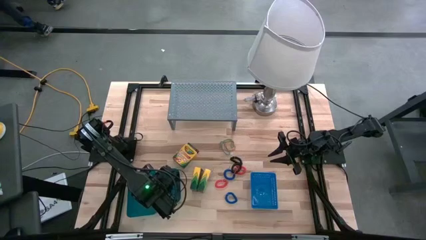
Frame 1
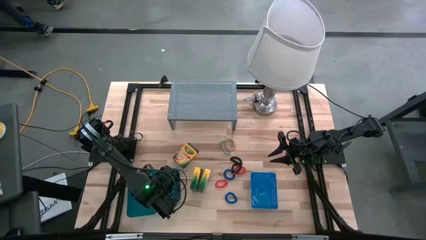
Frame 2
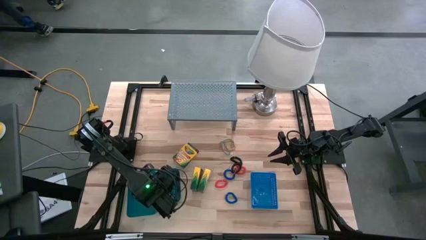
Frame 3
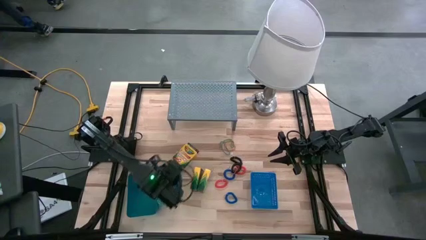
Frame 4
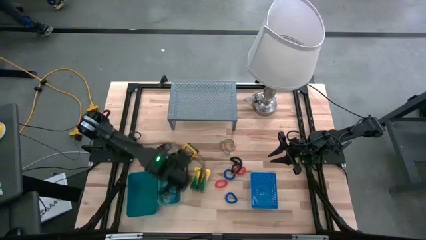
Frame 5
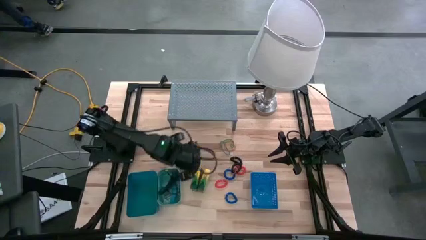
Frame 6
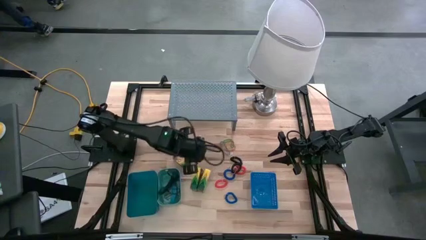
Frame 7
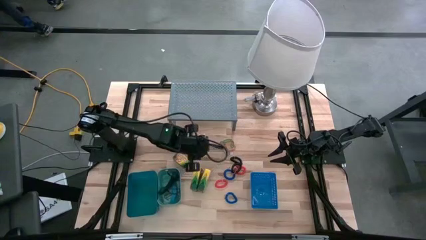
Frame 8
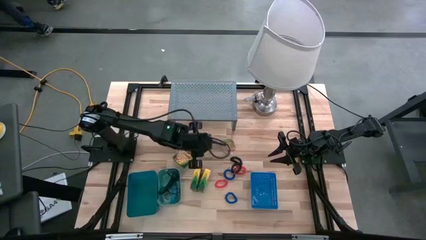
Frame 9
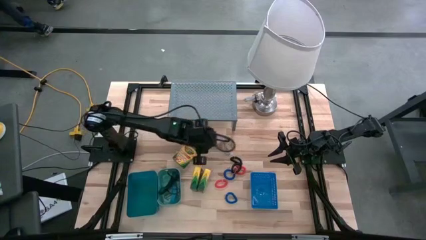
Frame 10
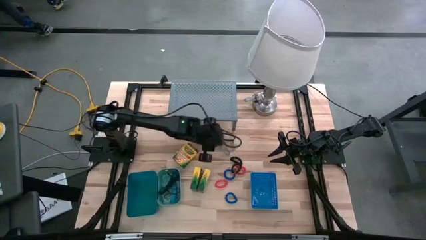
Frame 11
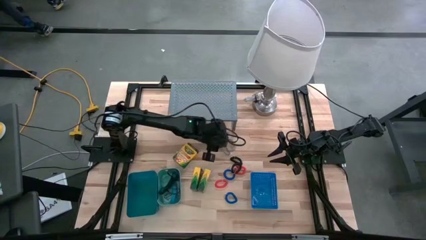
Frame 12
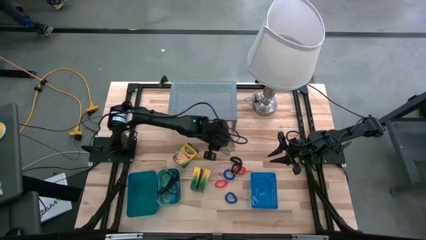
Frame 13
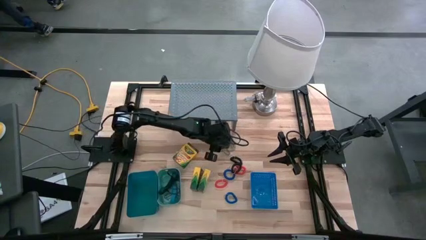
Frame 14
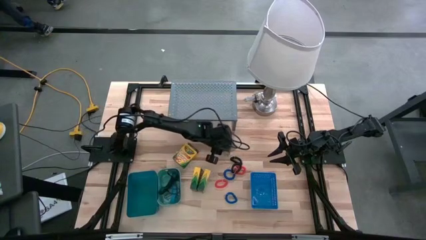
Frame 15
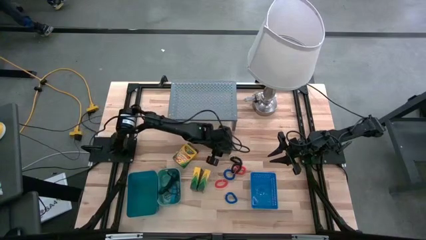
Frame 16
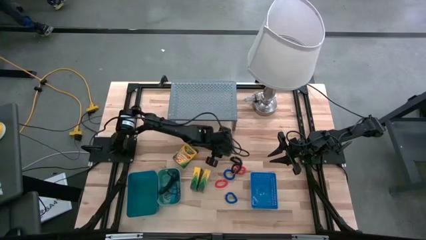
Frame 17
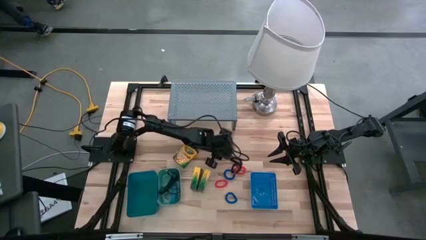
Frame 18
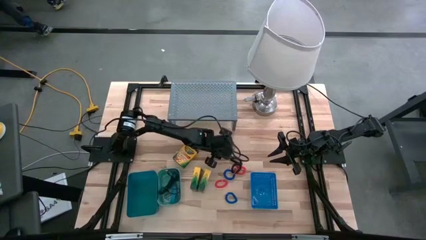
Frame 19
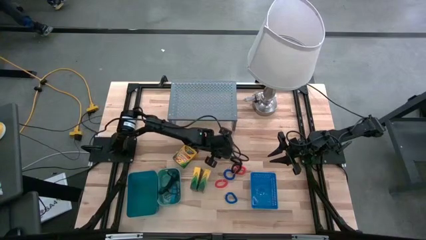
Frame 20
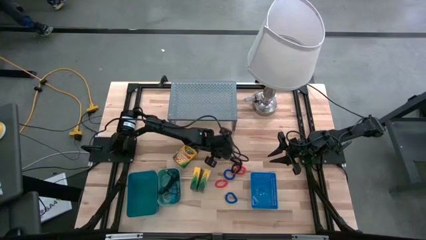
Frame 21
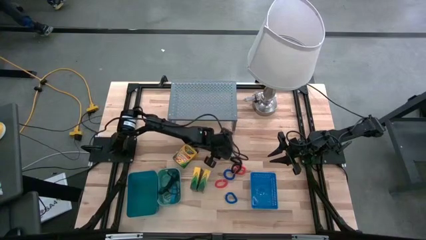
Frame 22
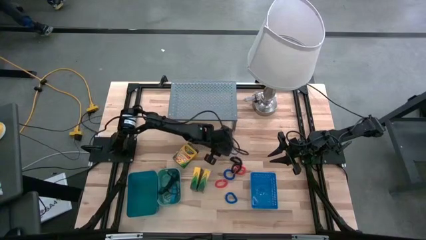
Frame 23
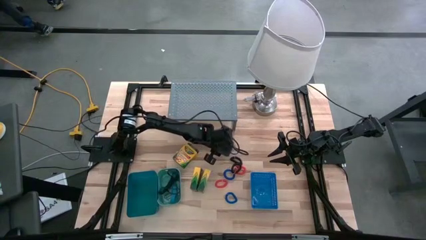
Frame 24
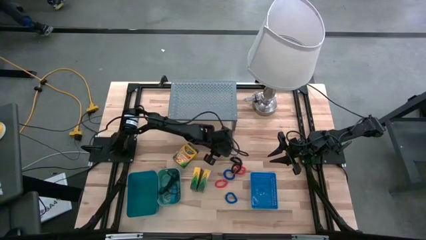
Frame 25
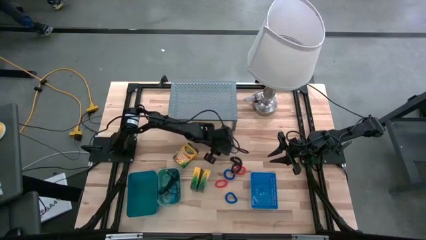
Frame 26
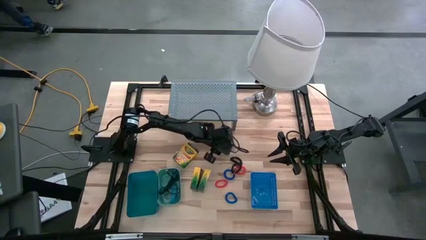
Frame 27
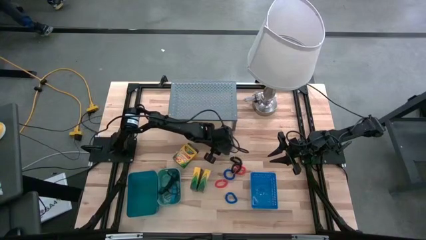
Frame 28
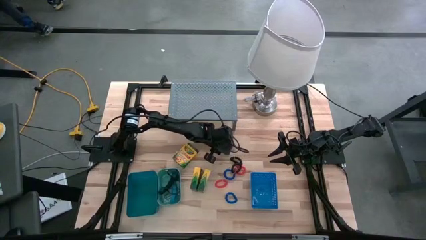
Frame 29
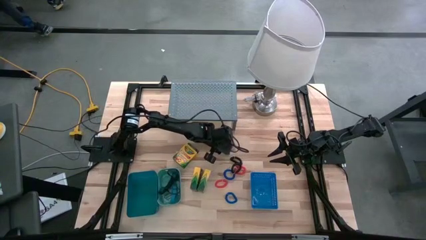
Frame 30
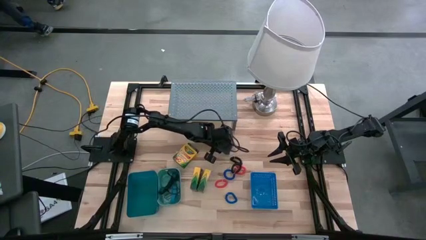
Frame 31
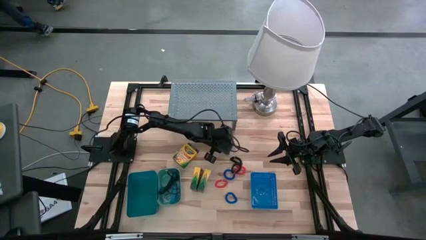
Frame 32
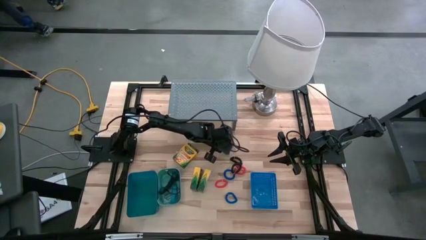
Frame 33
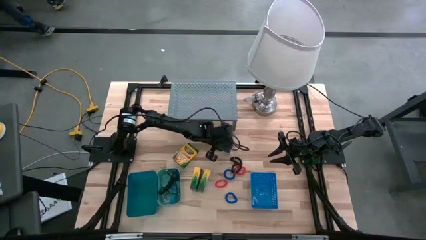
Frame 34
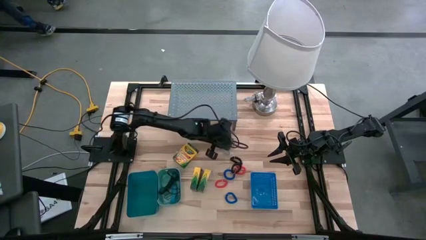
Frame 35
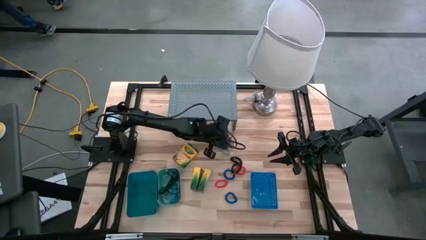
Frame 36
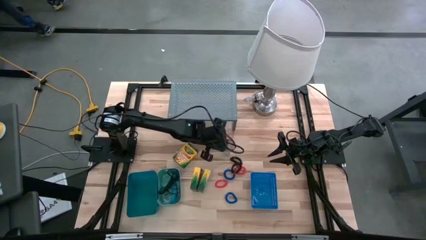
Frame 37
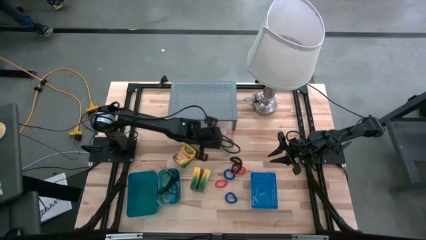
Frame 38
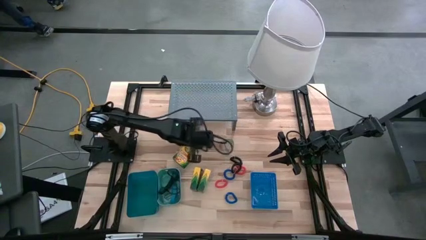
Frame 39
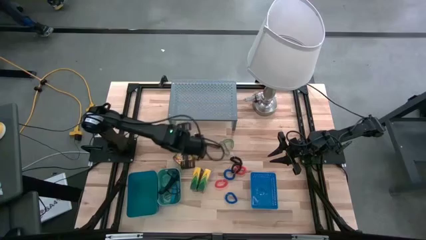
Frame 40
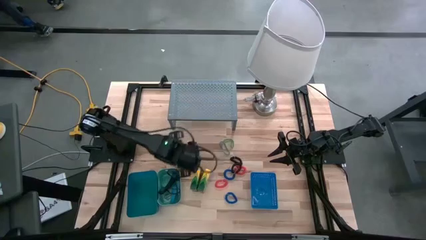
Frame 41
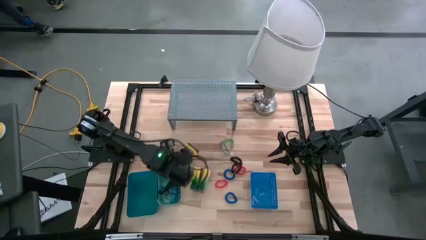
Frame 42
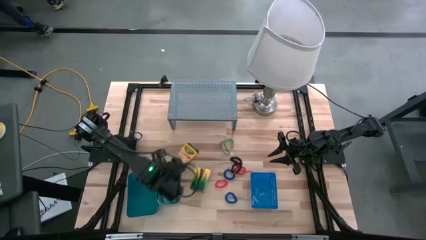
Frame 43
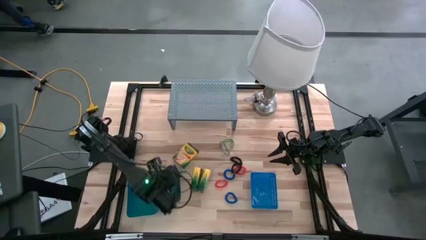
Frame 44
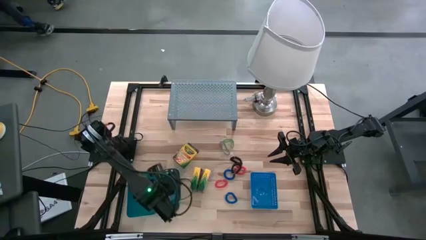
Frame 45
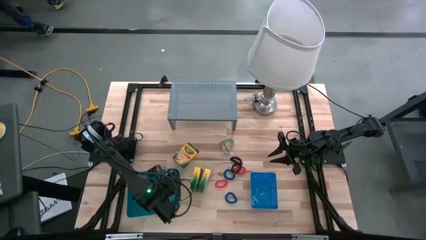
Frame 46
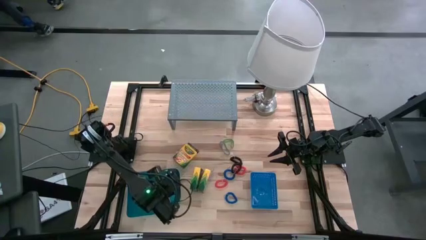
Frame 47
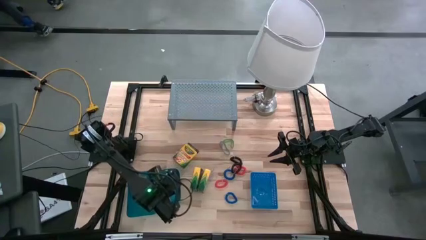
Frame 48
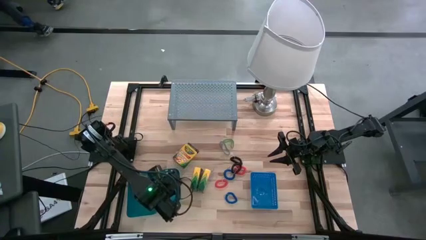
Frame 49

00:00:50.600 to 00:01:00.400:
Task: Pick & Place Office Desk Supplies
Put the orange rubber band into the green bin

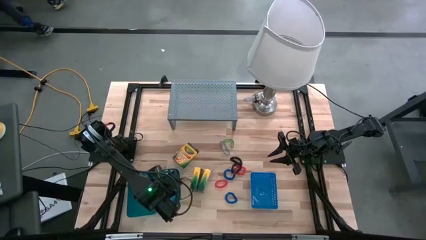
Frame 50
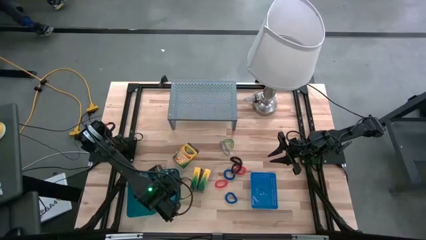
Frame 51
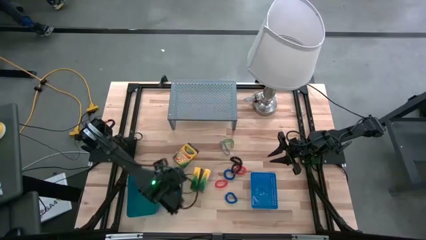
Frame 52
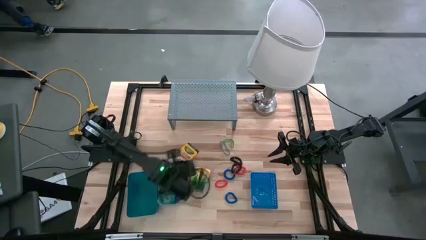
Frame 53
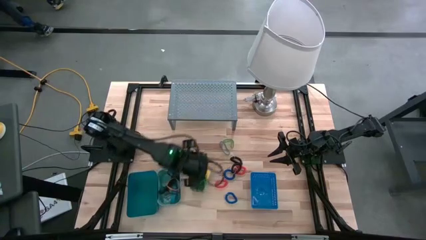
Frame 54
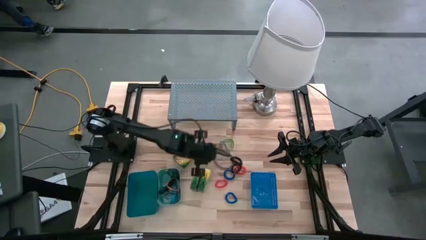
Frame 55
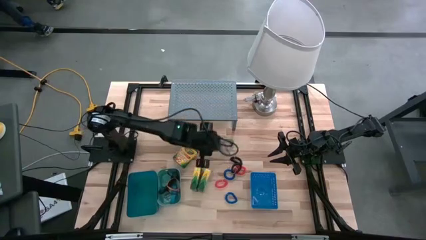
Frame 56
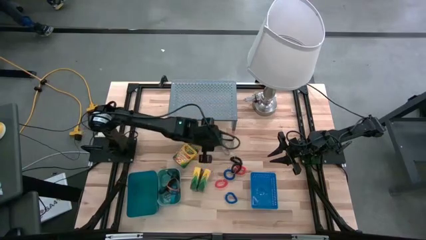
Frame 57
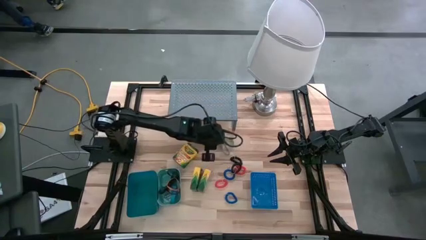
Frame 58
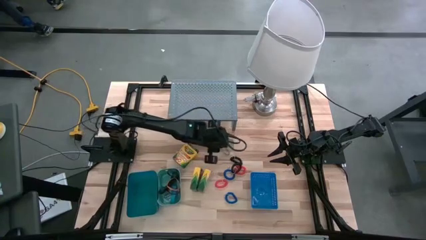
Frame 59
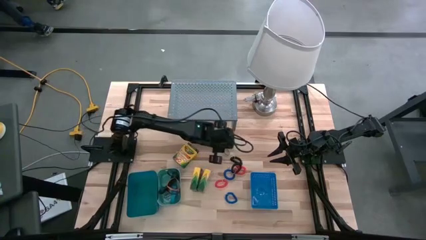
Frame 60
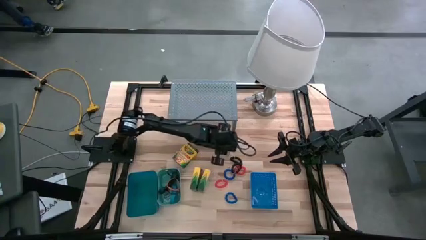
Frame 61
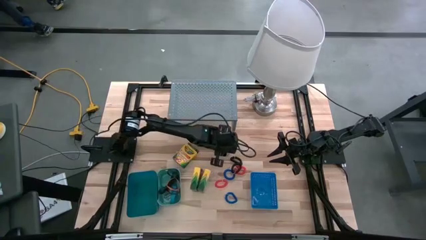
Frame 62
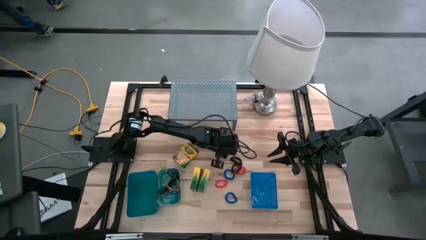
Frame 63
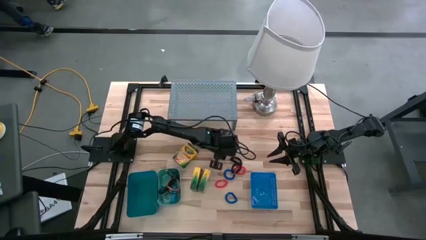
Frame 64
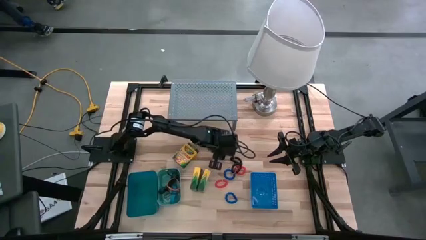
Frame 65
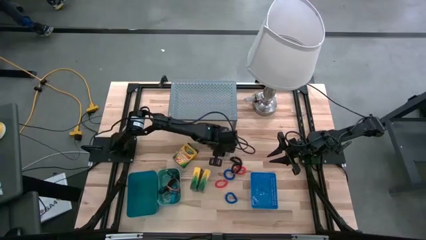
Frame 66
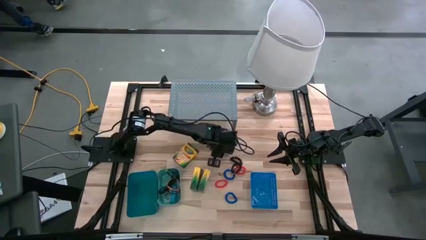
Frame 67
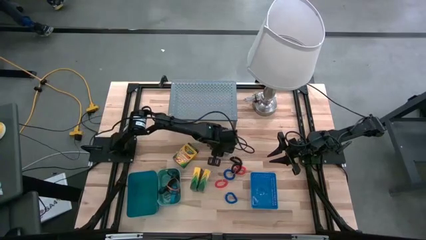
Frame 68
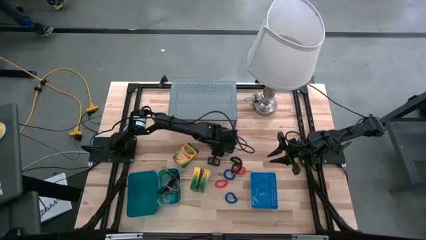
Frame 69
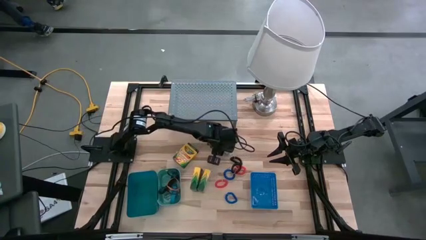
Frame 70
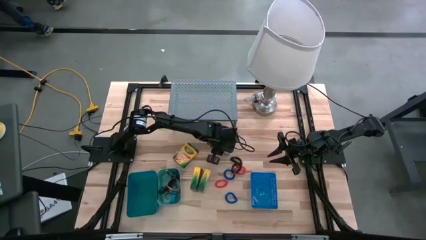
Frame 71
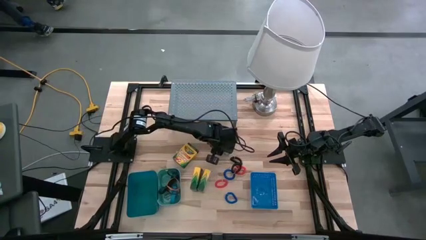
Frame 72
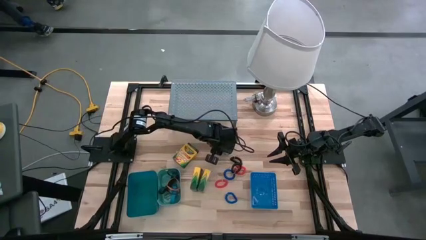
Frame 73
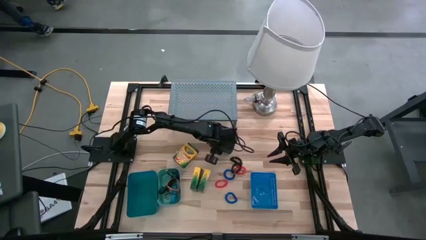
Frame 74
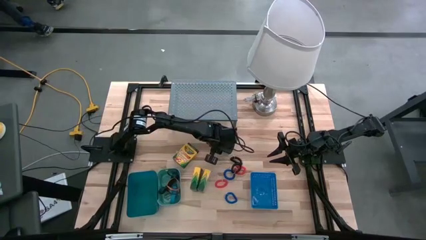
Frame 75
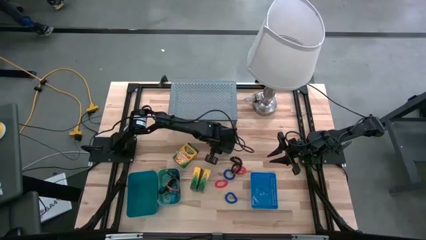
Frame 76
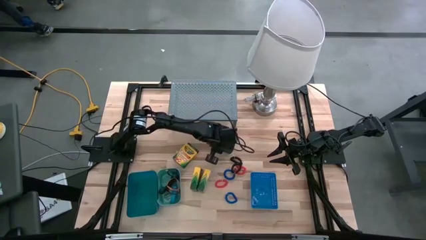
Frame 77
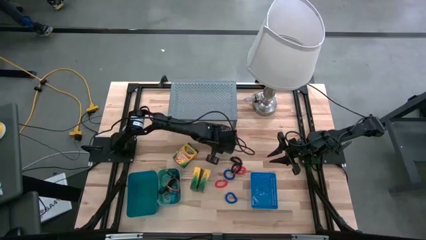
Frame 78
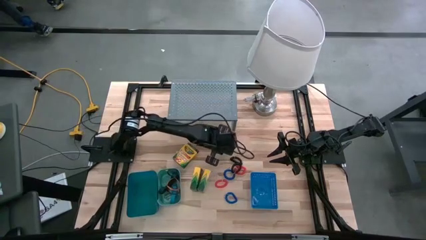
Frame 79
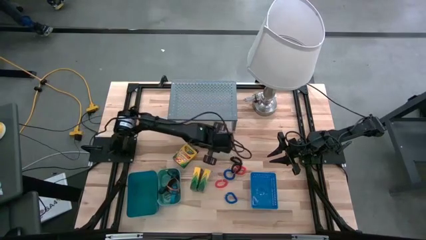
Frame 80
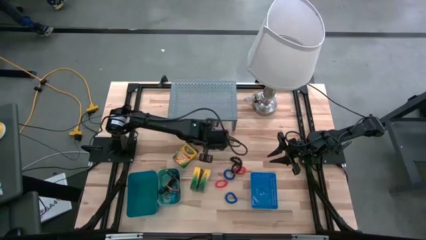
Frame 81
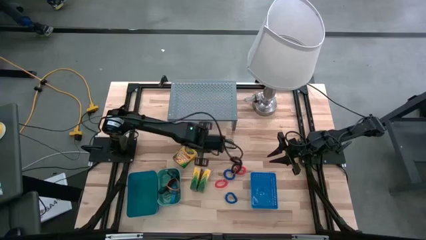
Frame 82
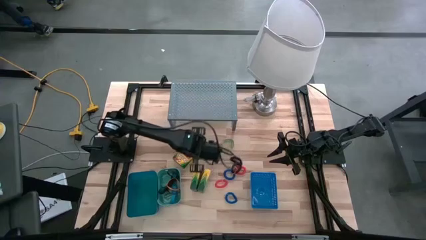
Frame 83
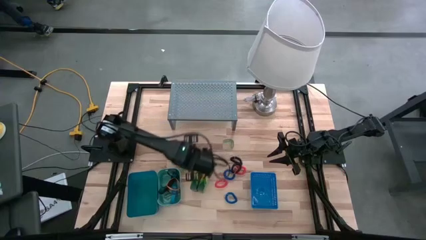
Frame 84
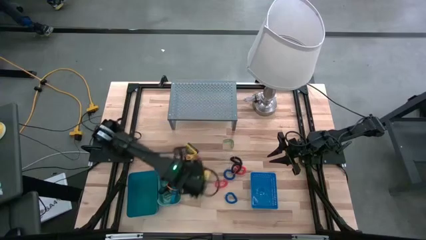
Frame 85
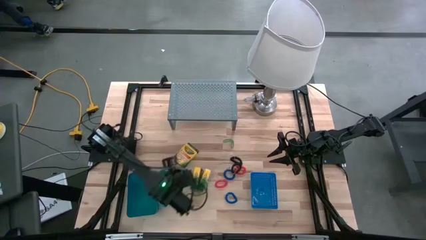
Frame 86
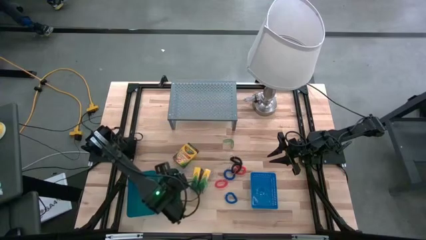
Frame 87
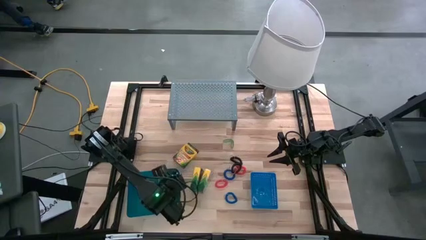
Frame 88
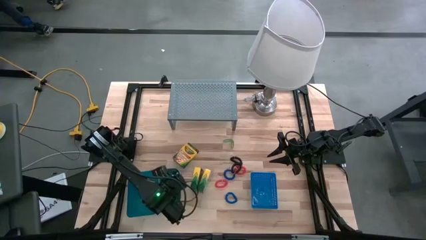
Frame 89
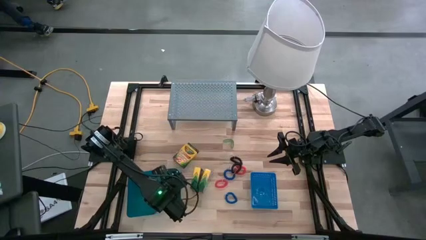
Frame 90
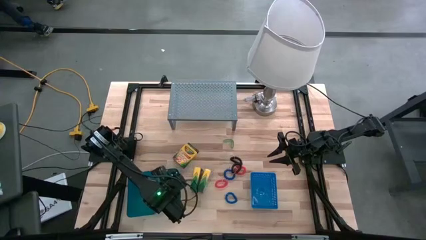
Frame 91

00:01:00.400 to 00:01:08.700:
Put the blue rubber band into the green bin
